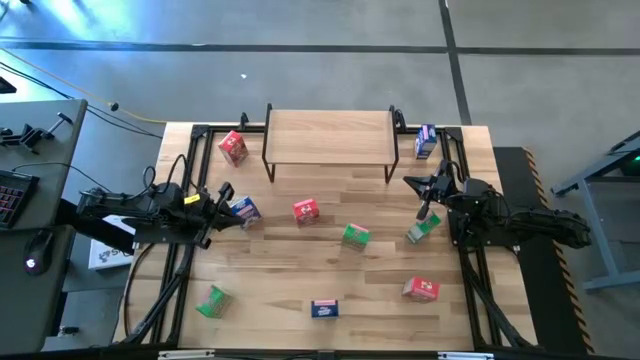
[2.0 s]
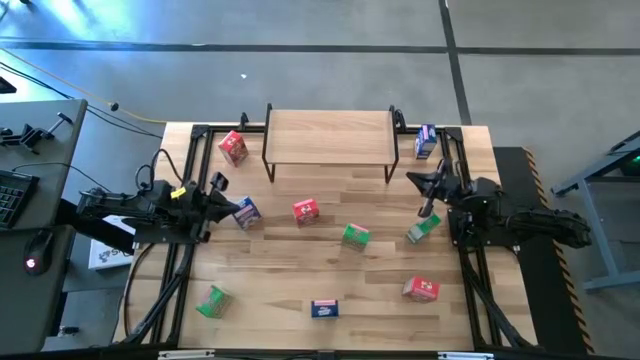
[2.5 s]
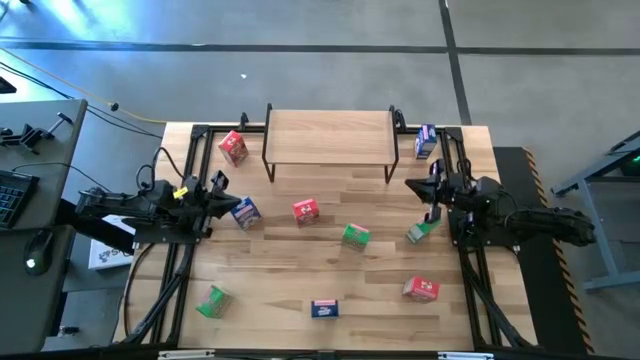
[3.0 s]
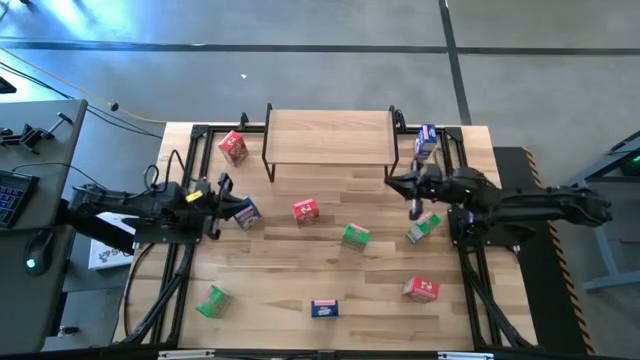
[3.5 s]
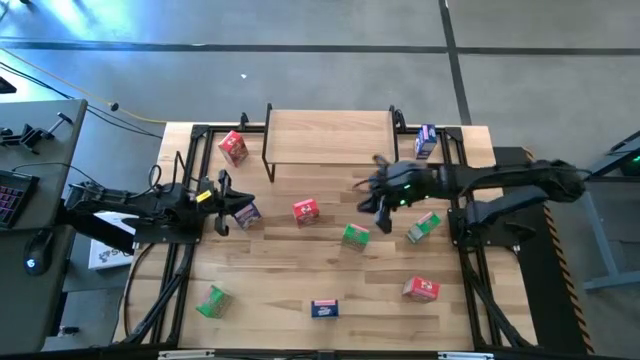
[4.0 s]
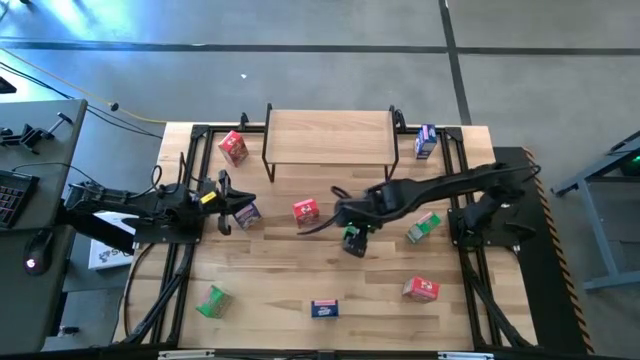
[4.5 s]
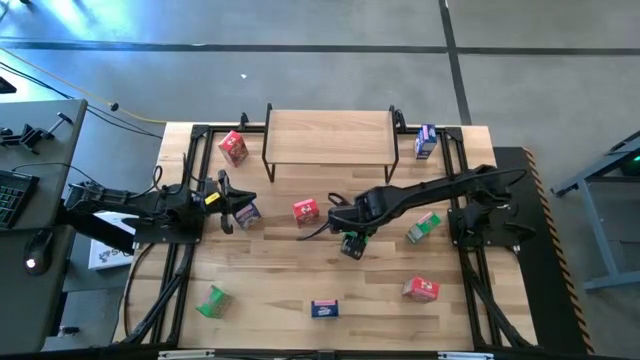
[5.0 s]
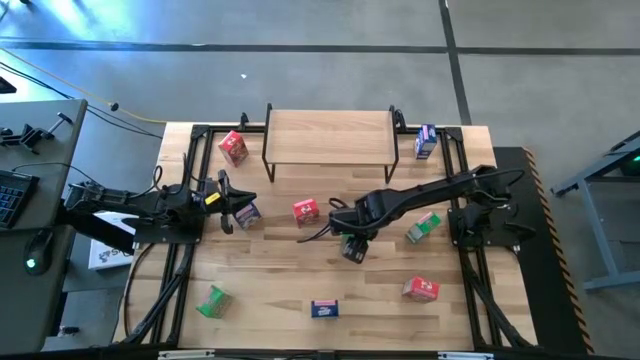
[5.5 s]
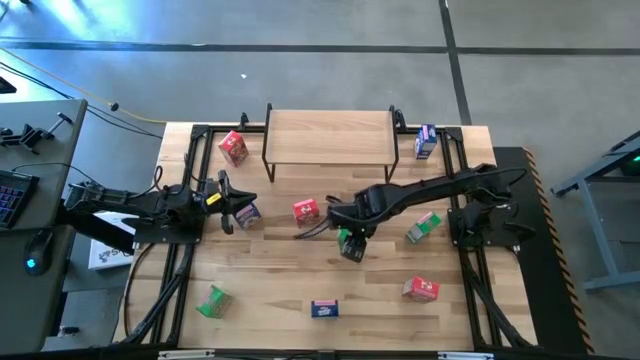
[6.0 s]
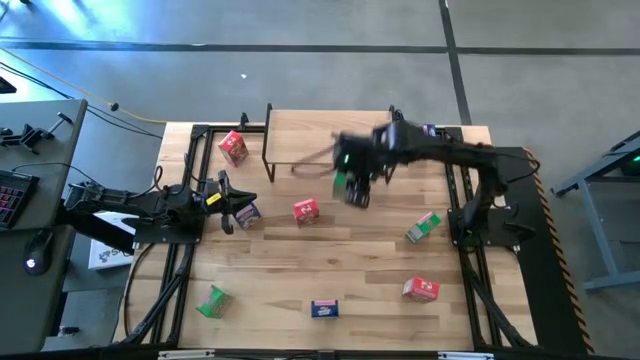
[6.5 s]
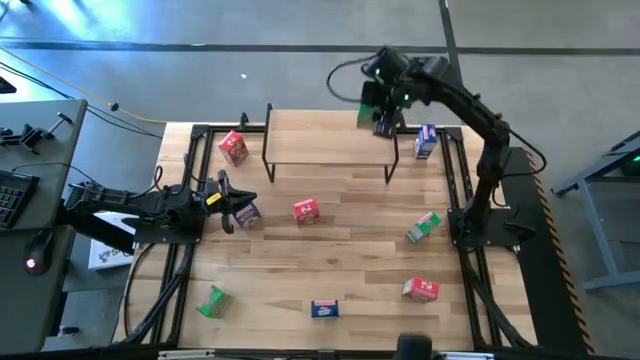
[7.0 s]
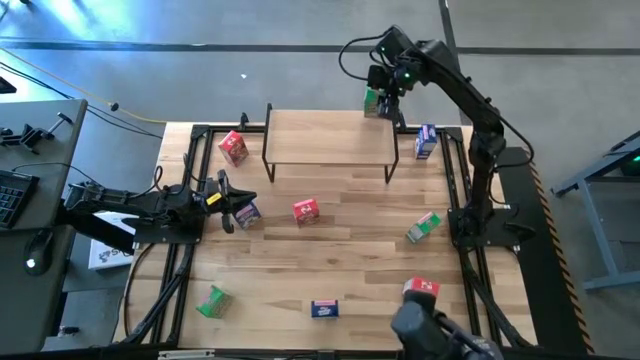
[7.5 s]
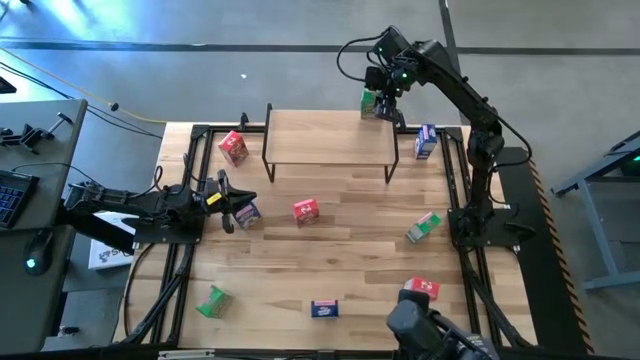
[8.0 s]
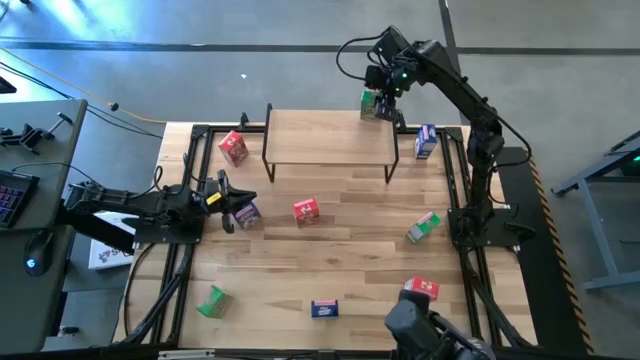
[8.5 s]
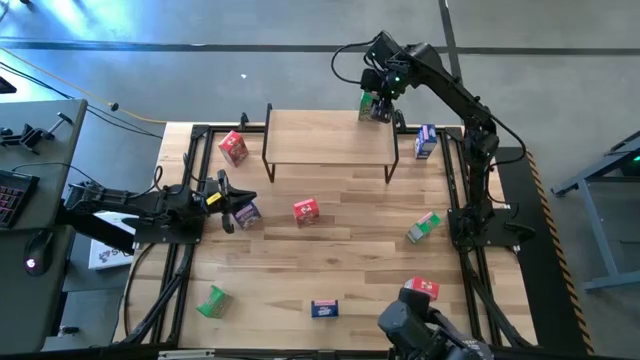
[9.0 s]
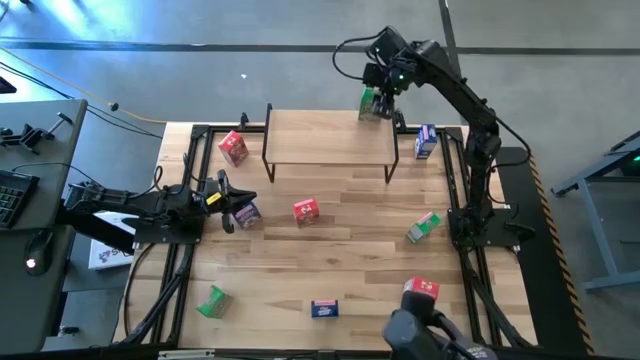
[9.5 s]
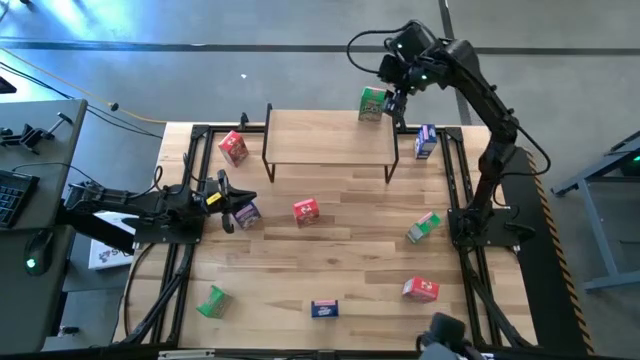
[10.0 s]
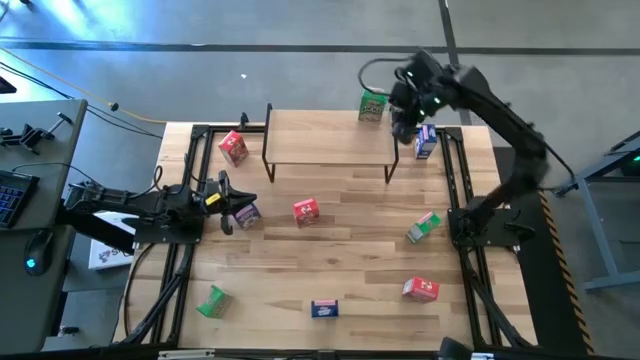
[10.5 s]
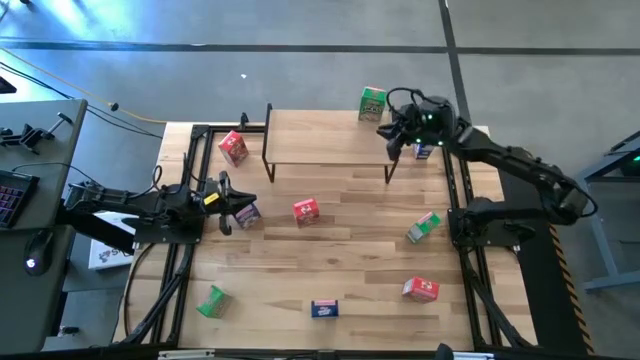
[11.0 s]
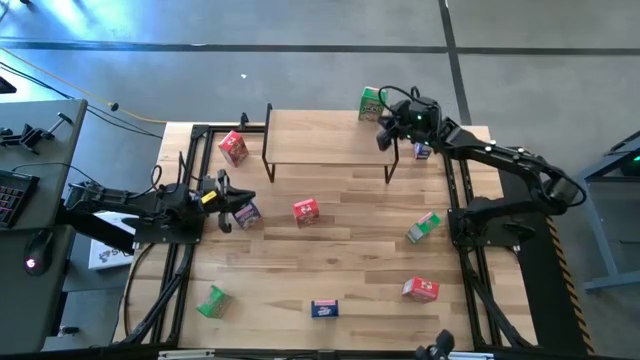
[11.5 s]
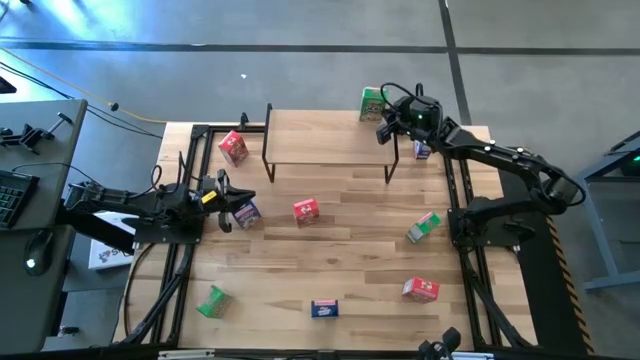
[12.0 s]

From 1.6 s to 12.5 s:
Task: Stack cereal on shelf
Put the middle green cereal box on the shelf

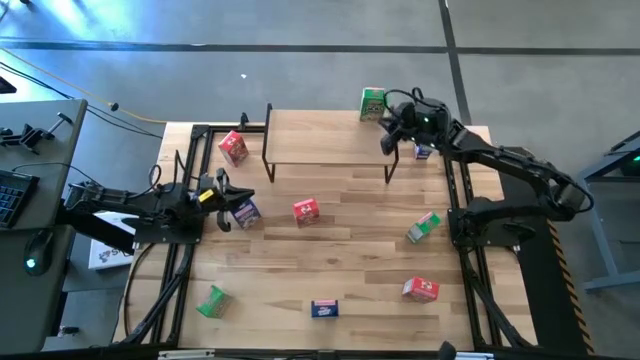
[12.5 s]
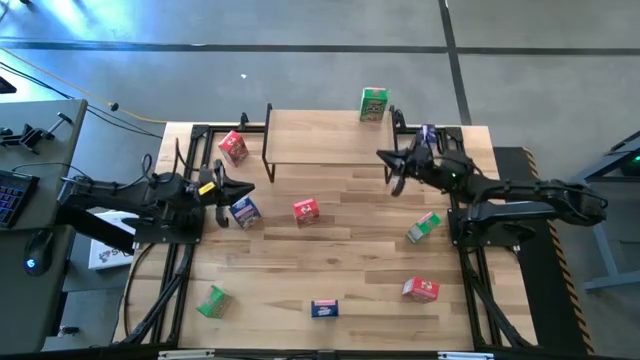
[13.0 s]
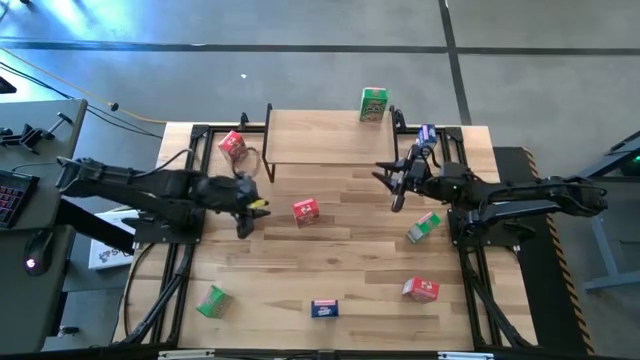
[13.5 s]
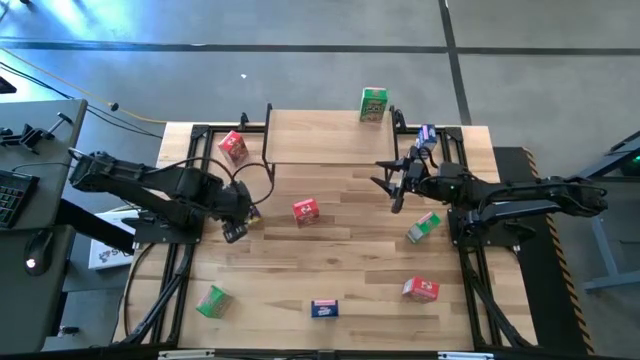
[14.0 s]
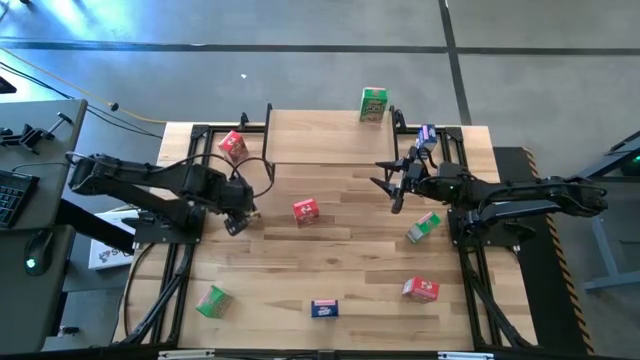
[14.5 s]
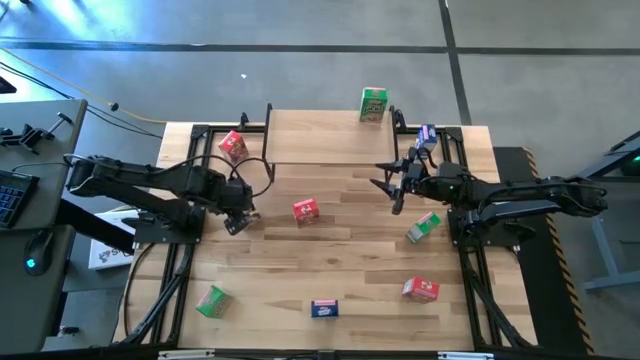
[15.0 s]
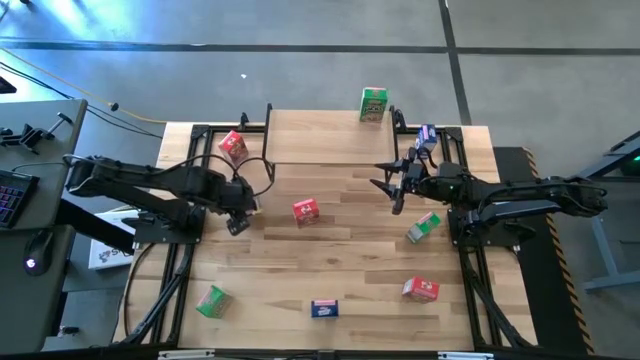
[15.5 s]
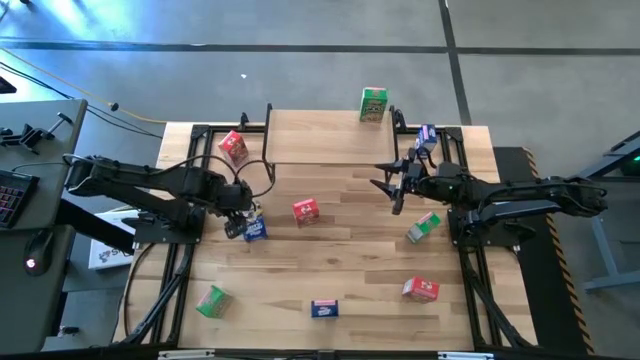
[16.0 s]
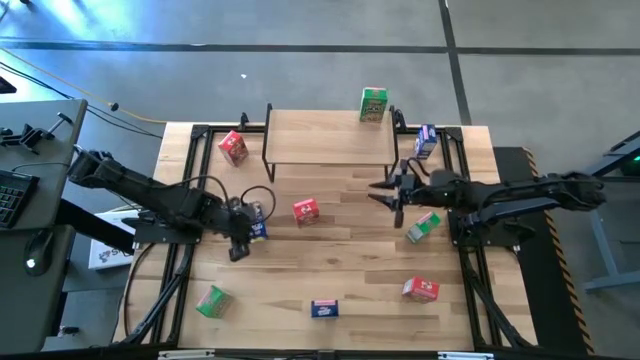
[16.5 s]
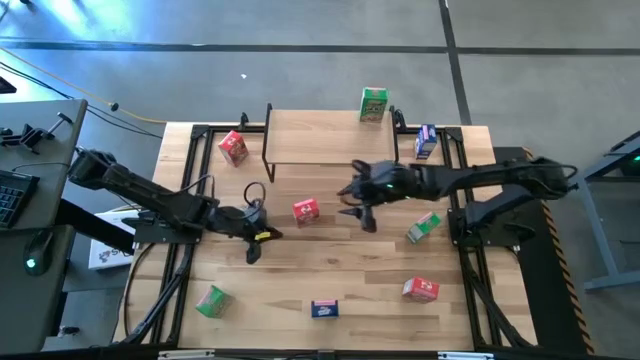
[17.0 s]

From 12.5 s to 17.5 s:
Put the middle blue cereal box on the shelf

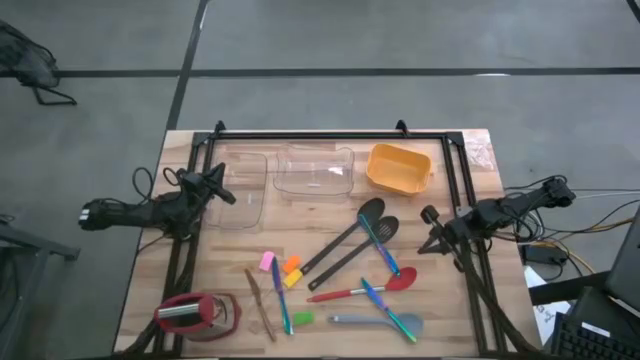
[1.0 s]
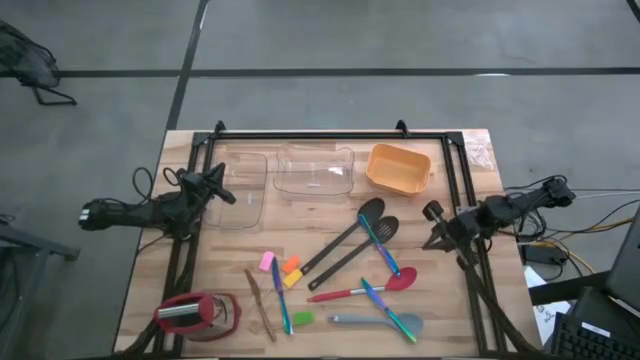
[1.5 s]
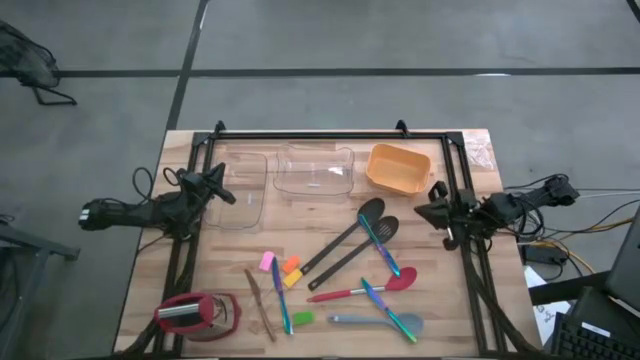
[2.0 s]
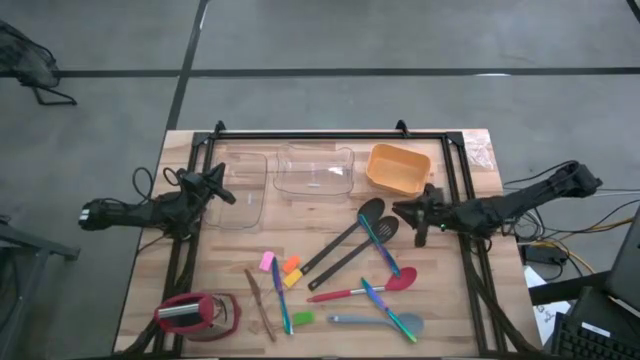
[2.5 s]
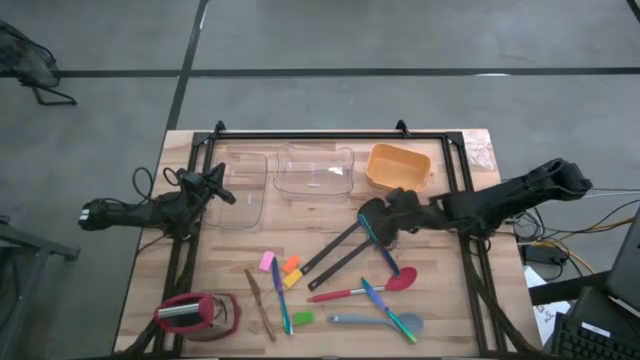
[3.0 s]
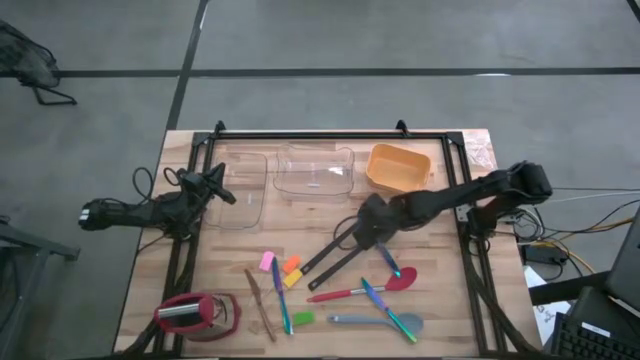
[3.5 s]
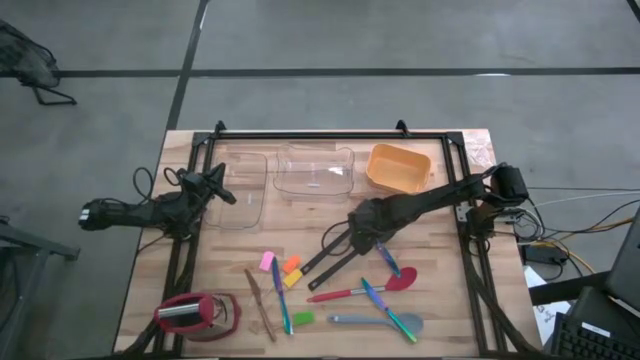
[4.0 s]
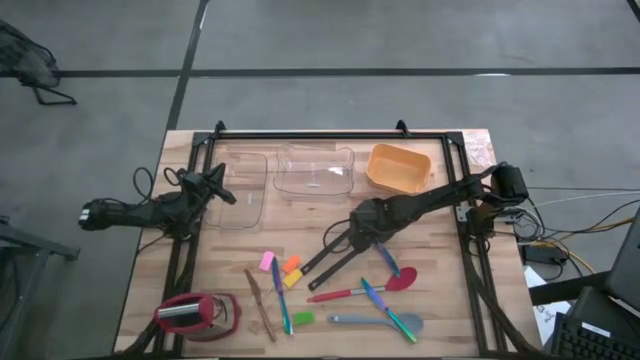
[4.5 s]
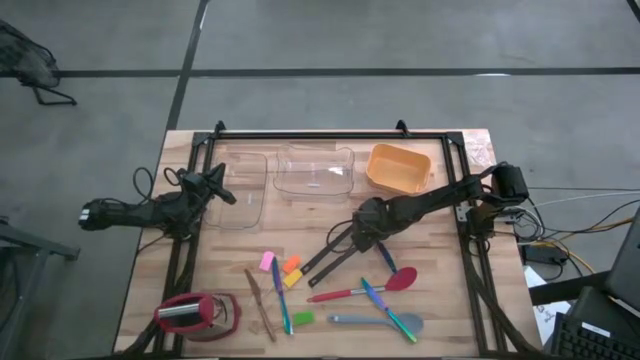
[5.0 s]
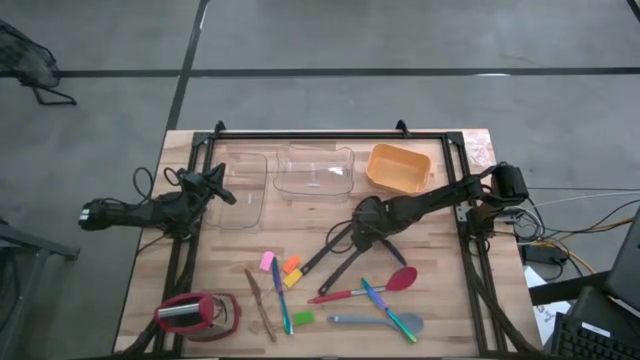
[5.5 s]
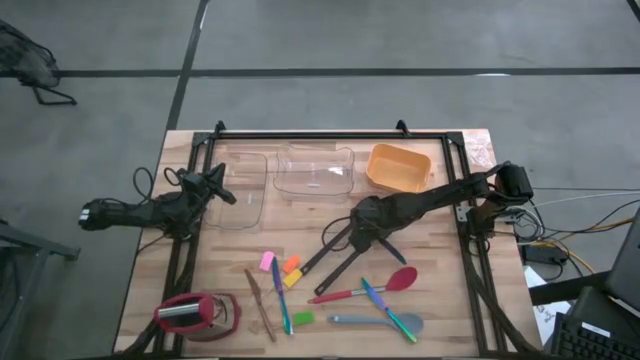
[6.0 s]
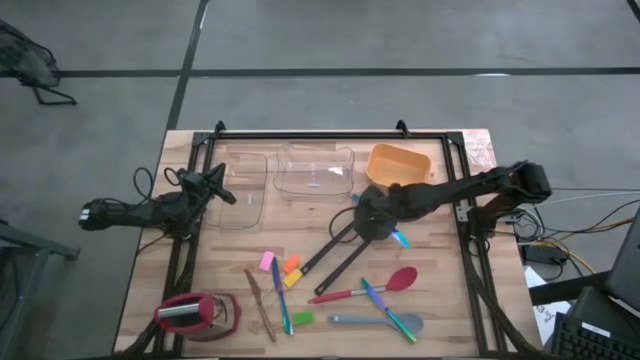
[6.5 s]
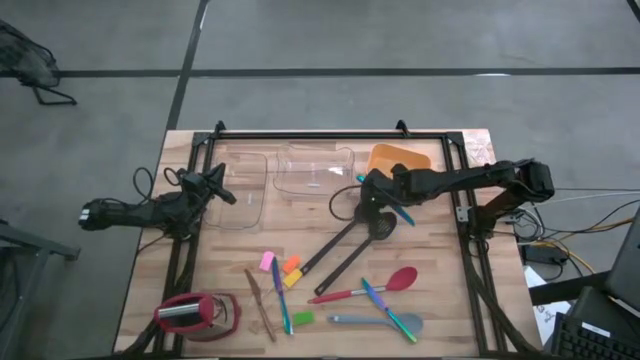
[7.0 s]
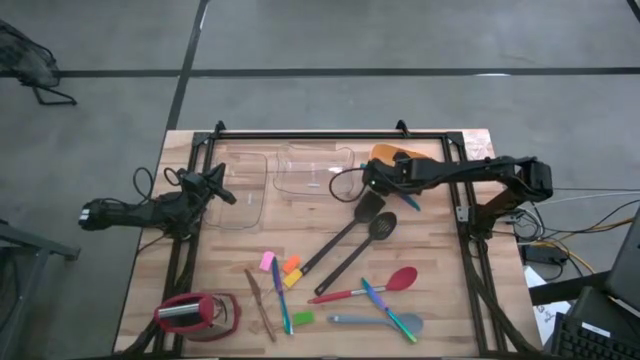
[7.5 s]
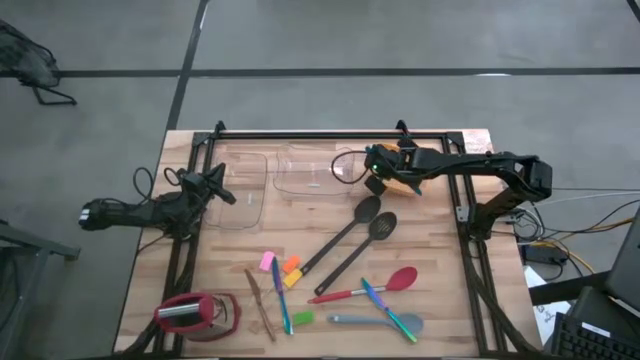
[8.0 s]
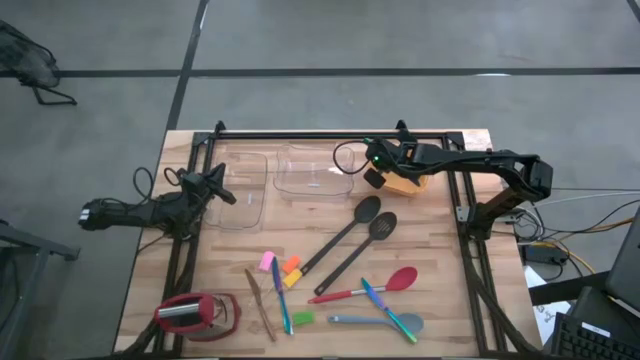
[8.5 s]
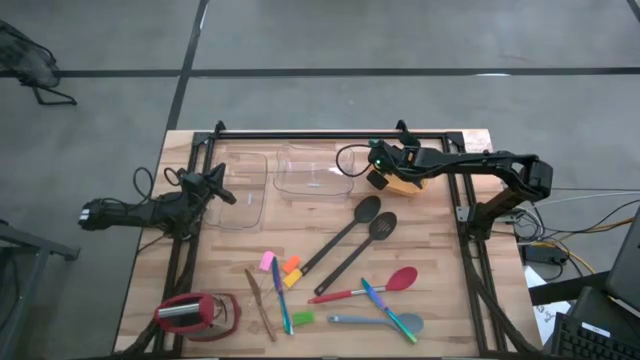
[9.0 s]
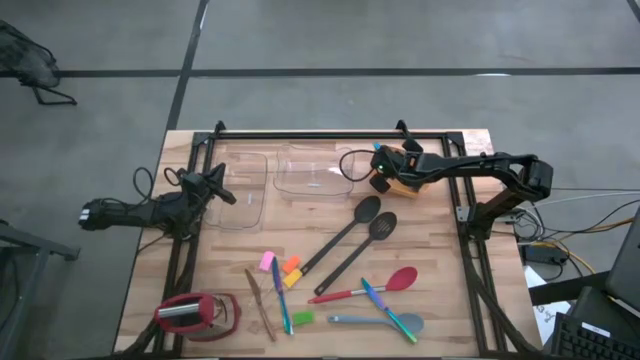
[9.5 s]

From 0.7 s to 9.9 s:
Task: Sort silverware by color (type)
Put the top right iridescent knife into the yellow bin
